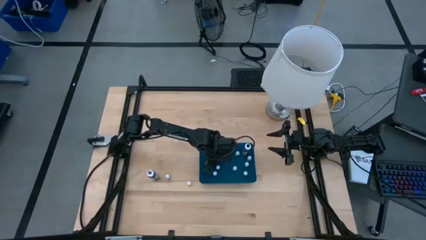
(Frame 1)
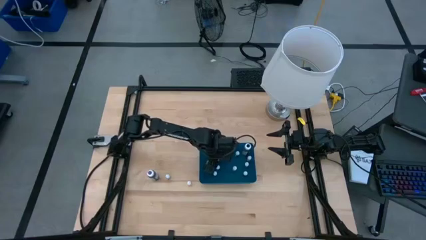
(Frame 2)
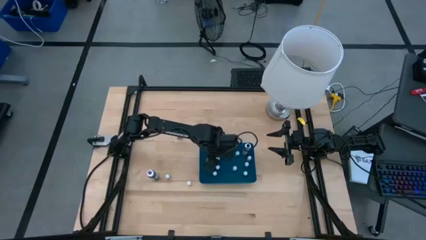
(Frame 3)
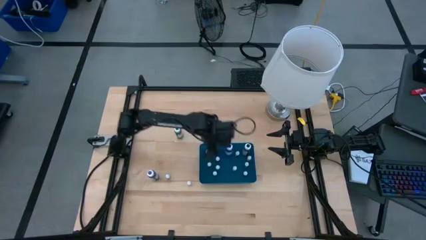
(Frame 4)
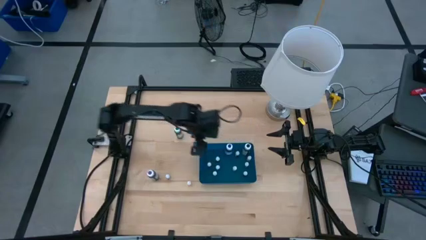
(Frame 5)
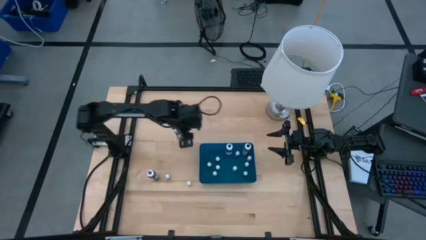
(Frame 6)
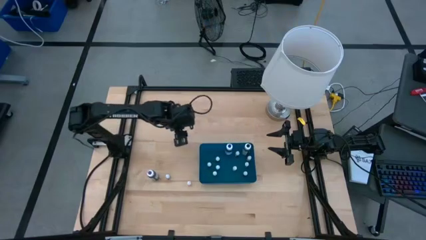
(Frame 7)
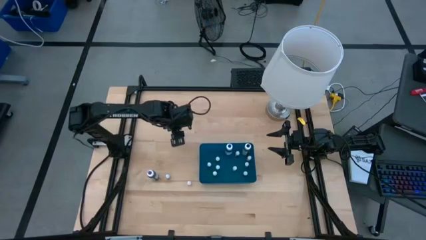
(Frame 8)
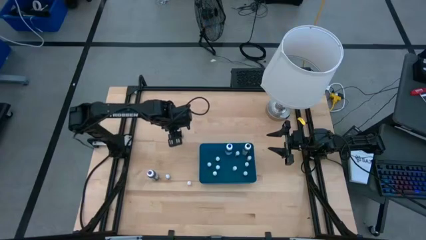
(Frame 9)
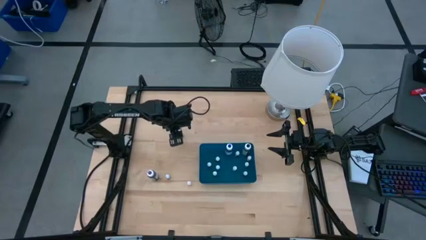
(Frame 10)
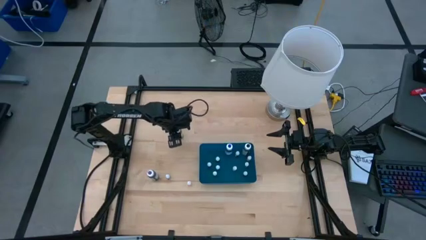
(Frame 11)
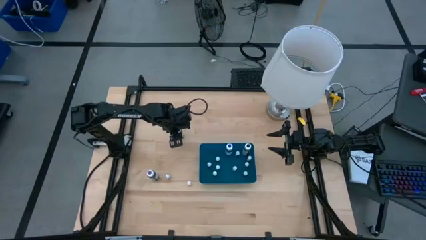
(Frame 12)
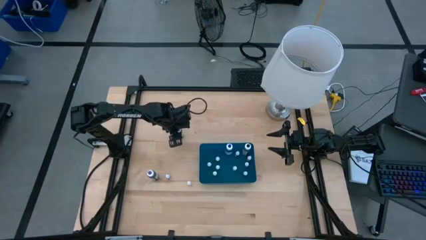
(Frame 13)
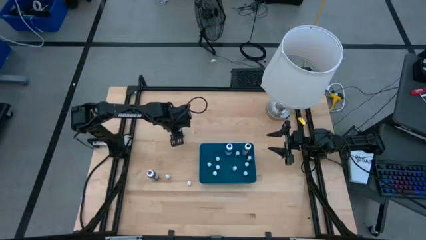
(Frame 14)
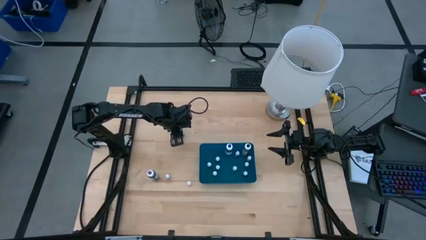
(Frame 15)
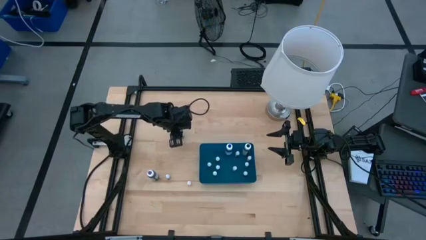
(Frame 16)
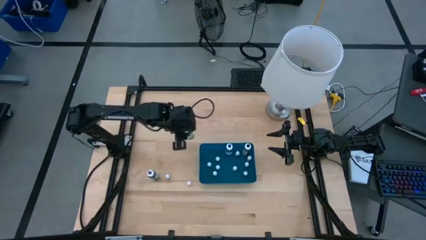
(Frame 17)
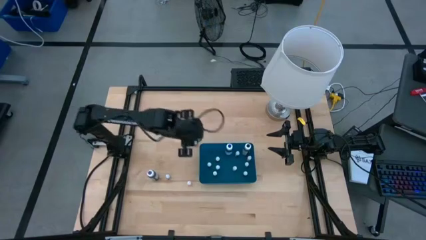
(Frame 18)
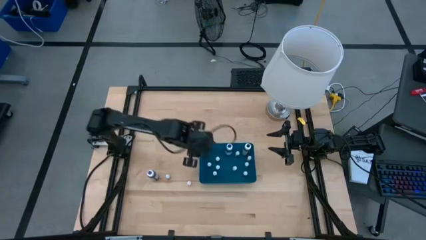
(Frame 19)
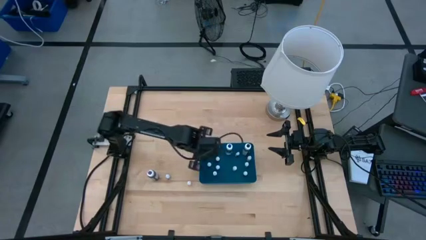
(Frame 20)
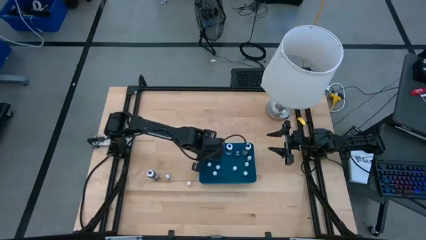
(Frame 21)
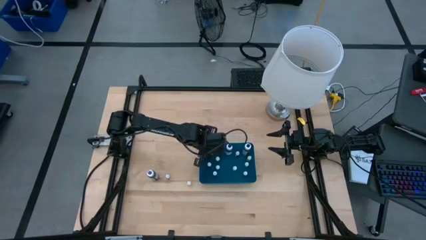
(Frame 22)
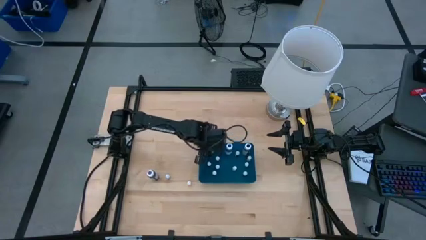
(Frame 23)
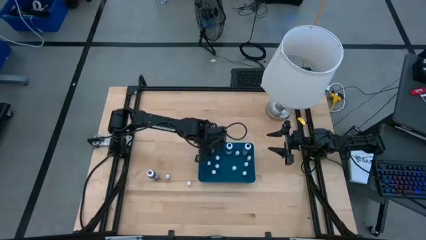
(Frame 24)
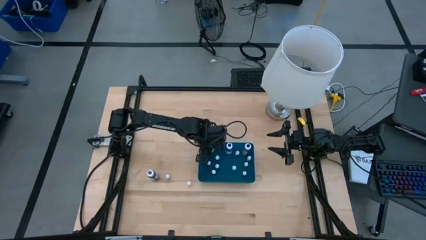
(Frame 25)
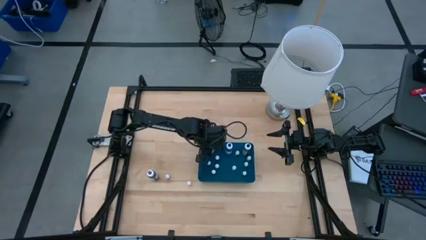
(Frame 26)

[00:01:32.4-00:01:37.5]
Task: Pick & Place food coloring
Put the big green food coloring bottle into the blue bin

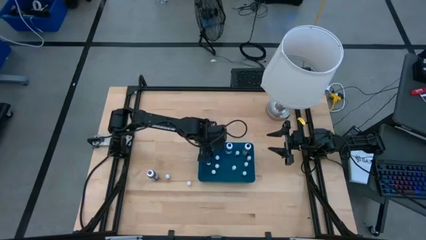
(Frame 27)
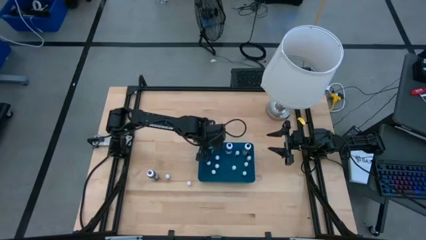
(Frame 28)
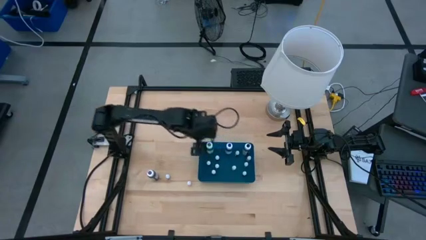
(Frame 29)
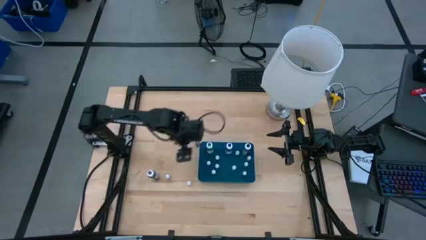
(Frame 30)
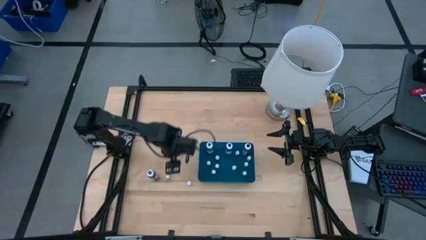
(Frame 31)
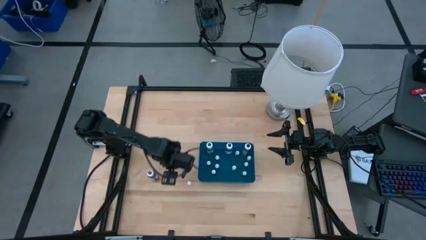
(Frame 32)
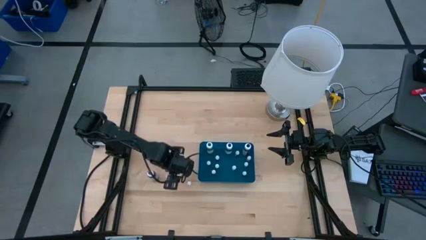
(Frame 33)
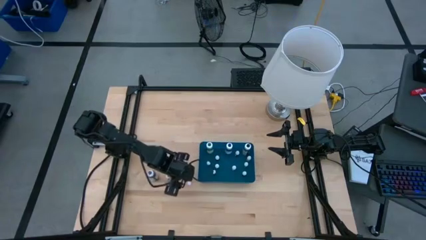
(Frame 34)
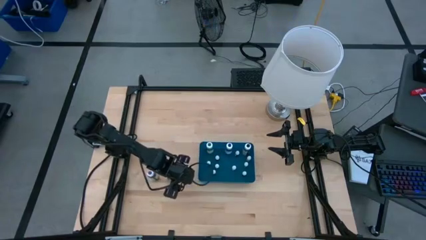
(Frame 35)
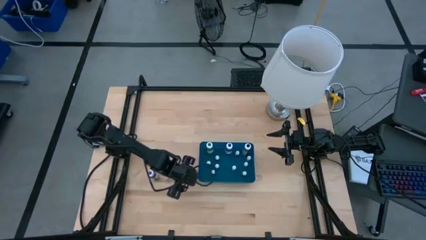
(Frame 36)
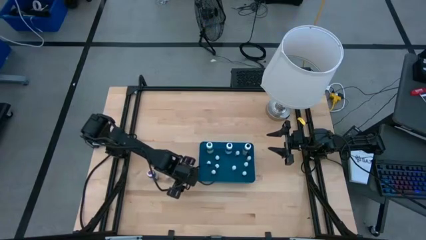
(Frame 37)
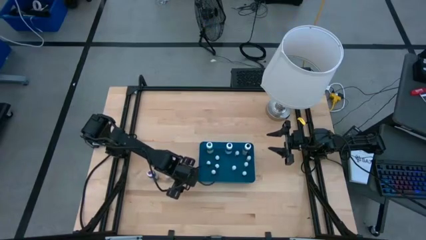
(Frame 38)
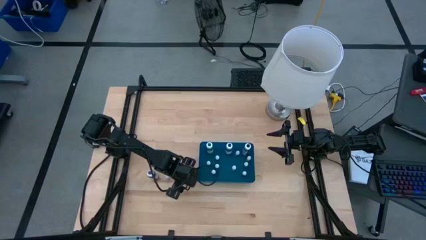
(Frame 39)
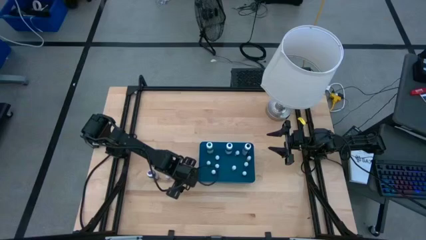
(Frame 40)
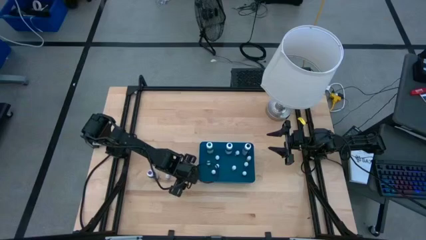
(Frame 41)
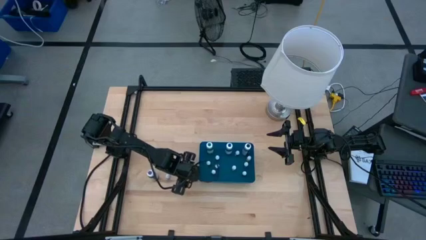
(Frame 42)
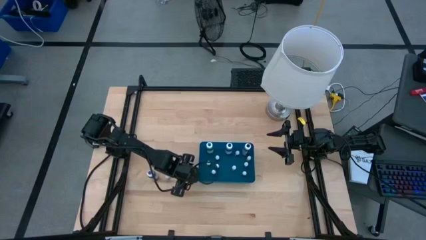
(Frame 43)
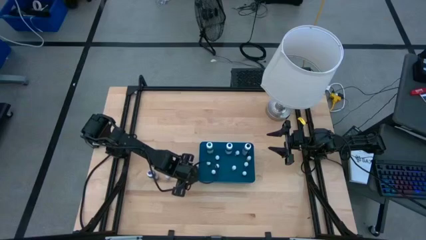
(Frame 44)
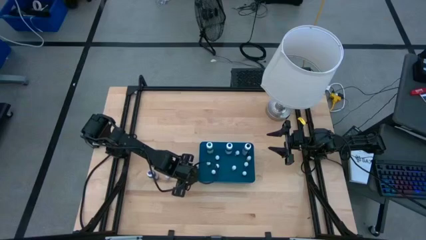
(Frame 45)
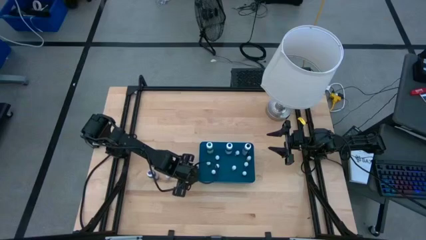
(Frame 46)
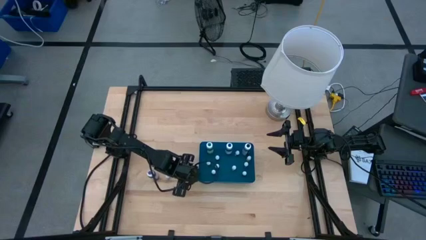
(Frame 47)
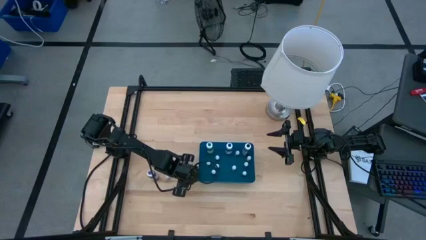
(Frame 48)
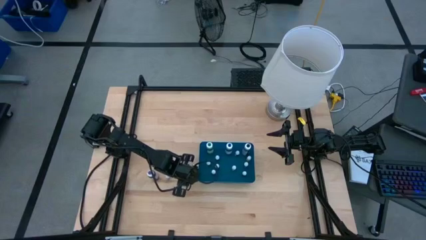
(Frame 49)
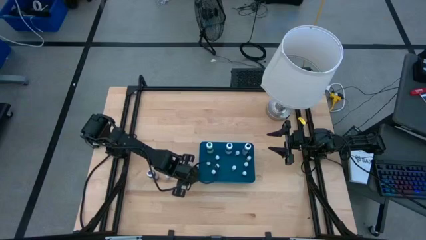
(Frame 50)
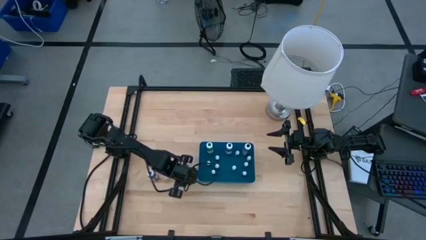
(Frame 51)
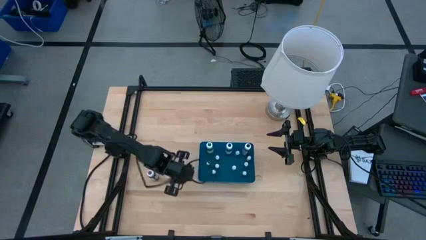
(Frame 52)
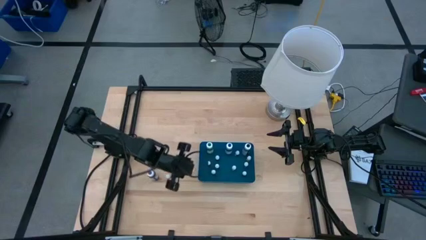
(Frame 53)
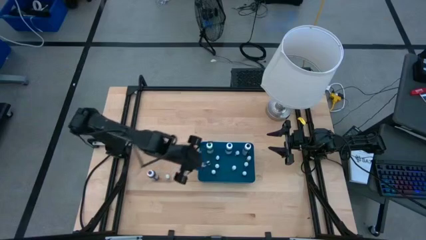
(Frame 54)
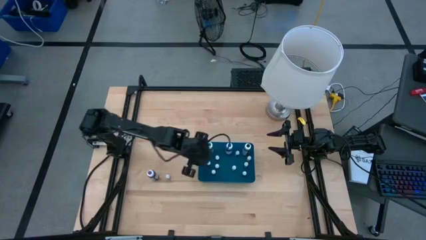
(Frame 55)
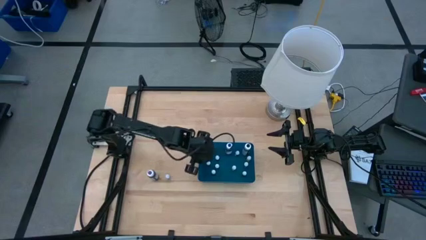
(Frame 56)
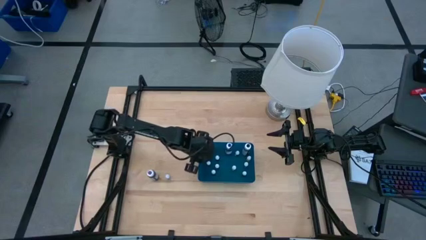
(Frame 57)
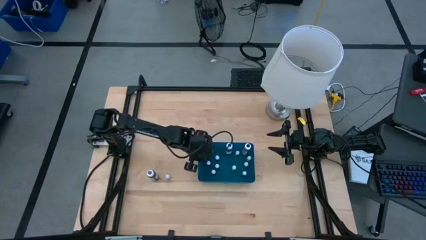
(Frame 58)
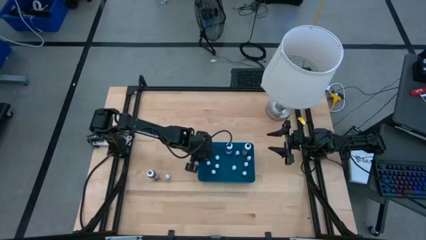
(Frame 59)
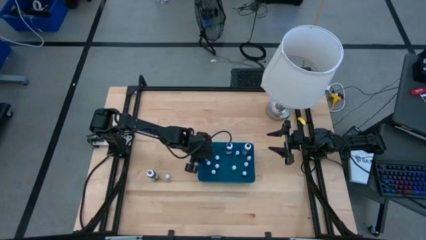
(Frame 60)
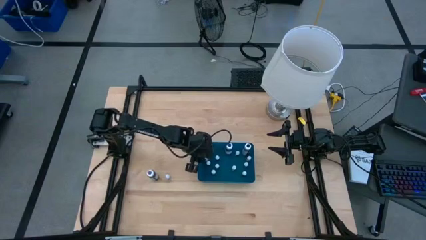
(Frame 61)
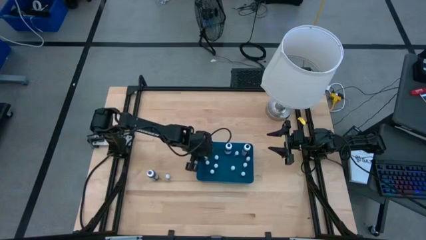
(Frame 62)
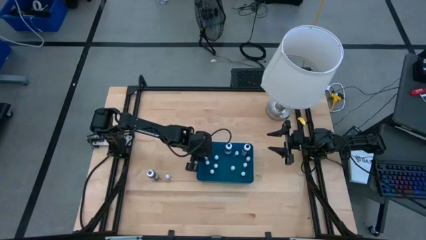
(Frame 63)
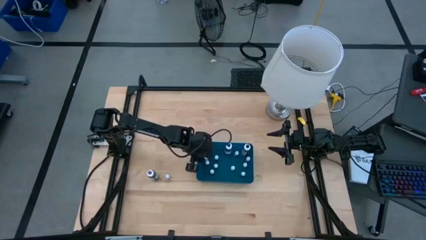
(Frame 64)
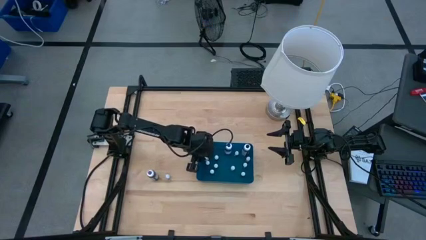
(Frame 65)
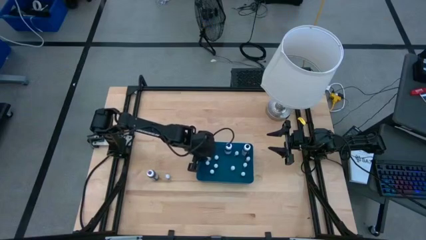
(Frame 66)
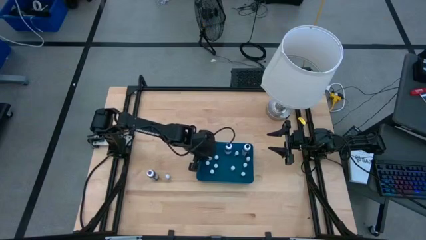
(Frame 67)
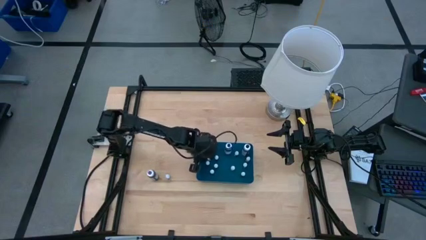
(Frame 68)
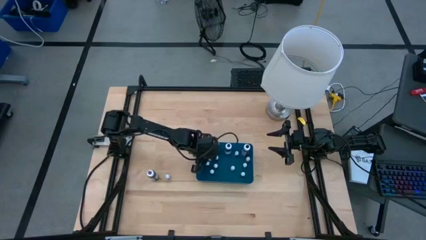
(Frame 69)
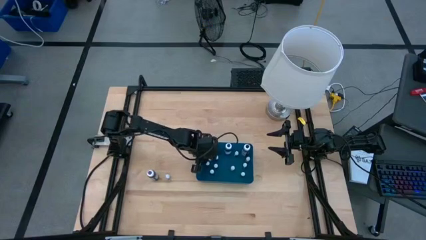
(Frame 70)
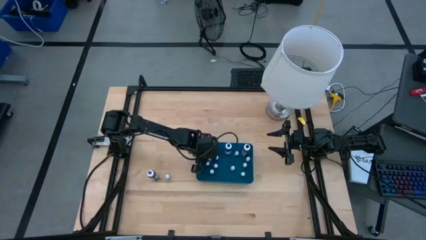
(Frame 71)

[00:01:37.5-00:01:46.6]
Put the small orange food coloring bottle into the blue bin
